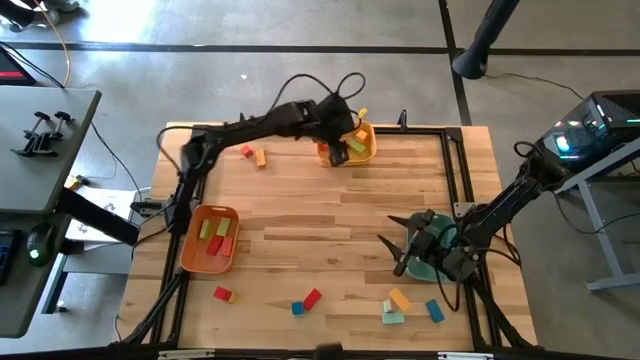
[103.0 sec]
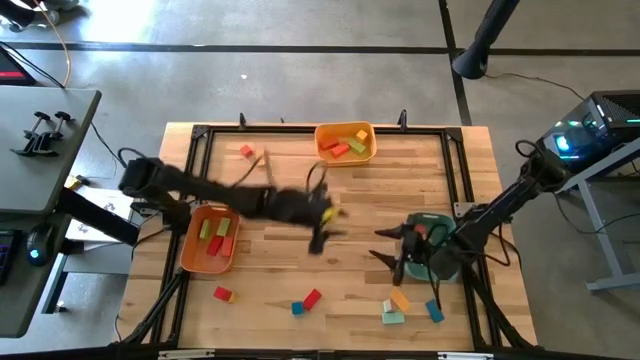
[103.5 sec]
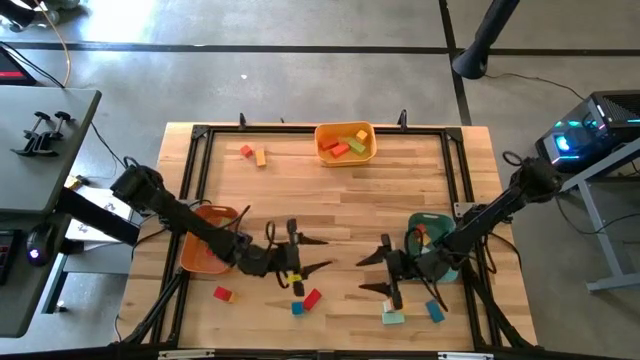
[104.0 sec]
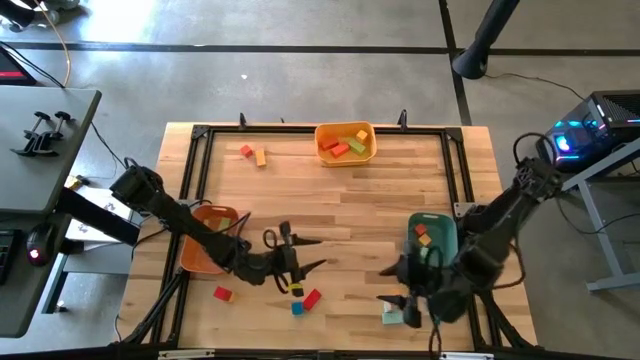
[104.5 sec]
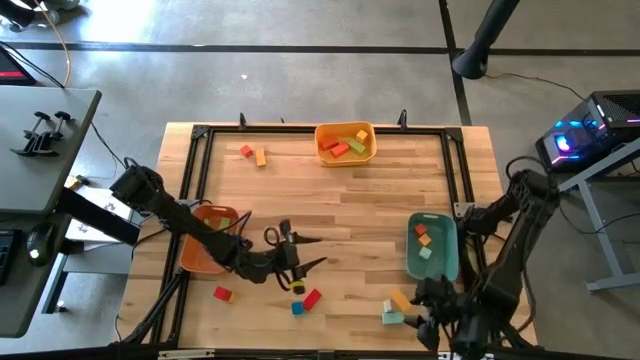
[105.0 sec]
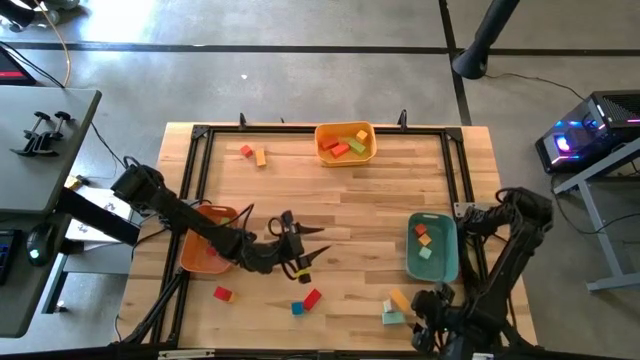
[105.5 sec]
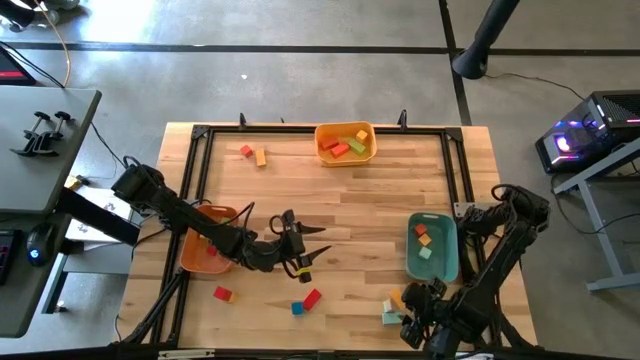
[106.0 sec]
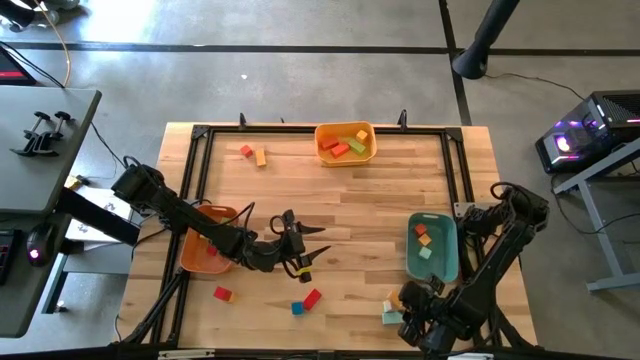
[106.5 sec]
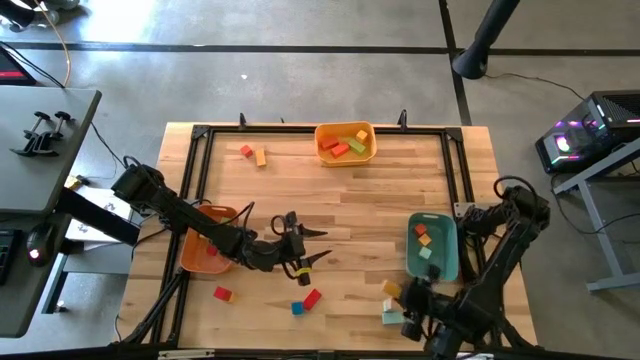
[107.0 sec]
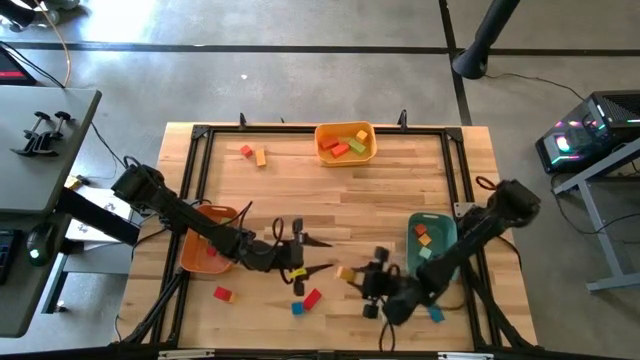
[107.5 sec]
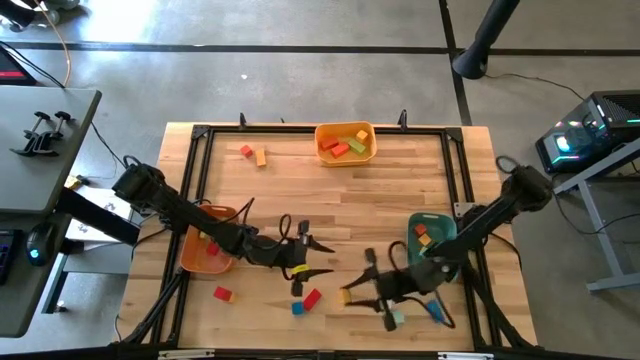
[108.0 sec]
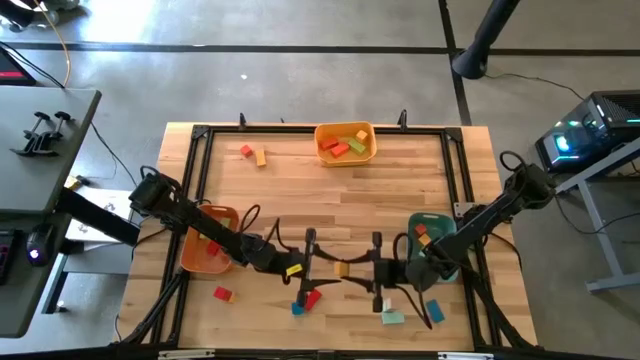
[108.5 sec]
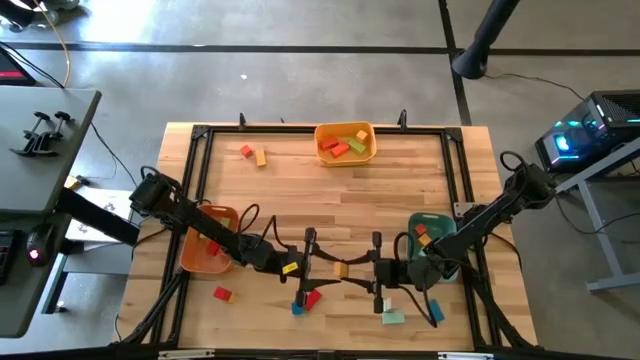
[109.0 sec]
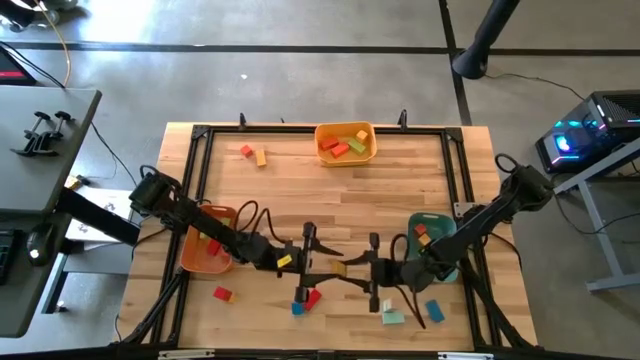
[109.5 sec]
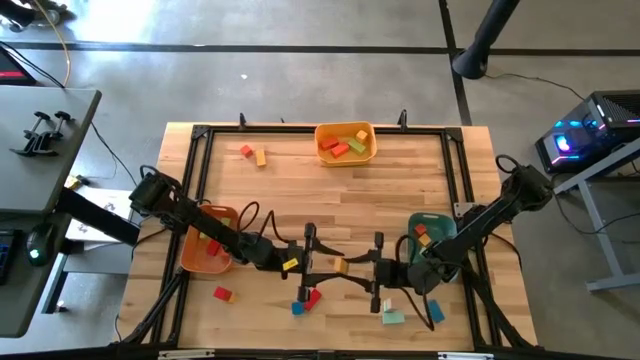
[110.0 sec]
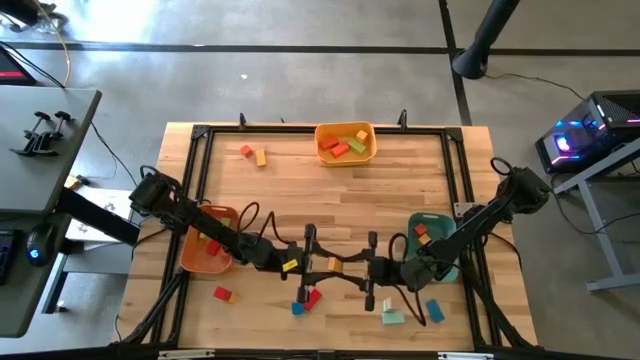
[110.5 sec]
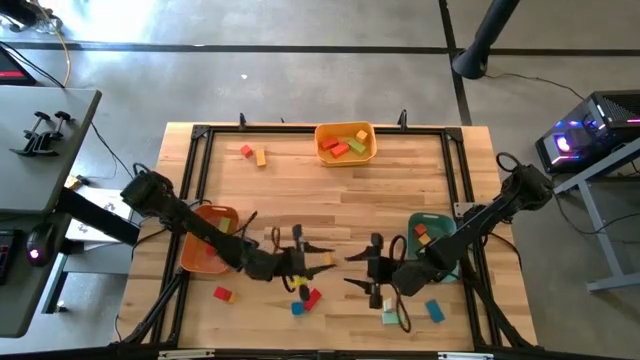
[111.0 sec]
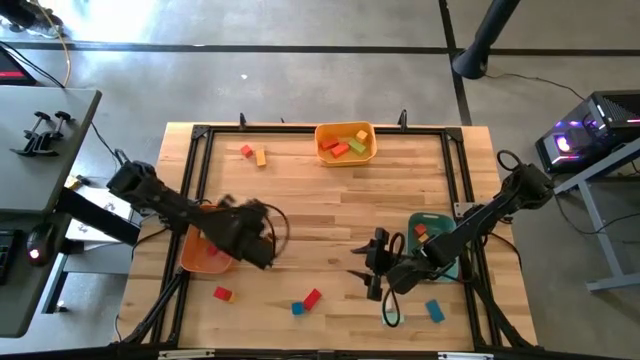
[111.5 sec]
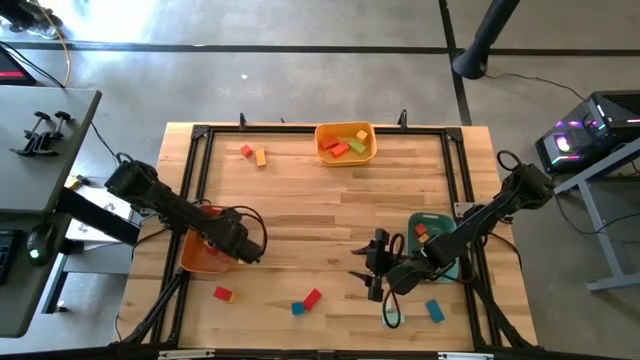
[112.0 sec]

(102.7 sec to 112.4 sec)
Task: Sort blocks by size
Put the yellow medium block into the orange bin

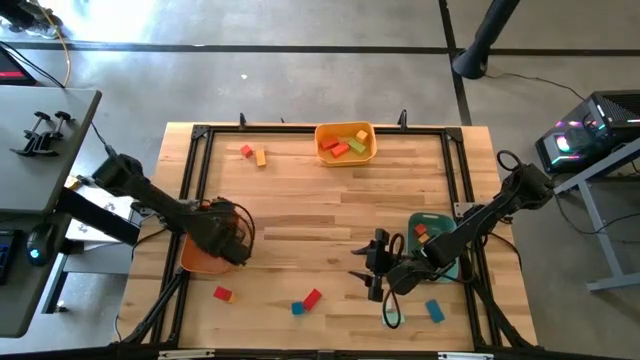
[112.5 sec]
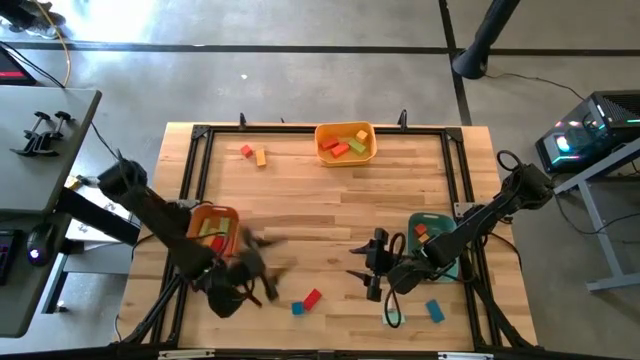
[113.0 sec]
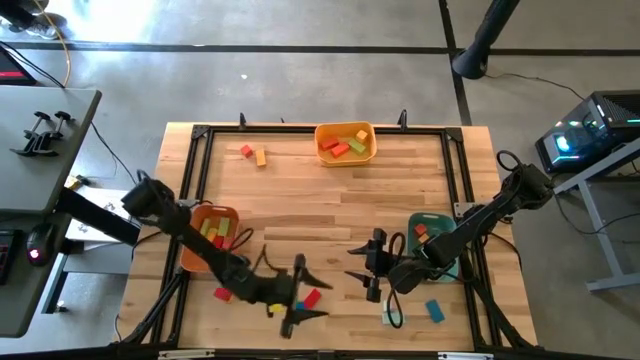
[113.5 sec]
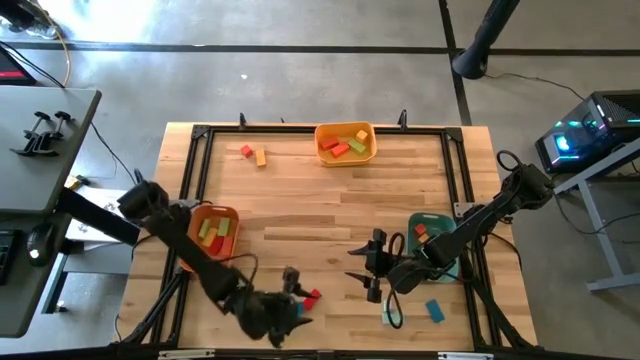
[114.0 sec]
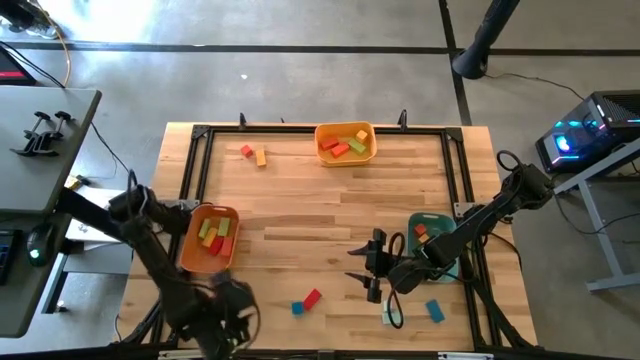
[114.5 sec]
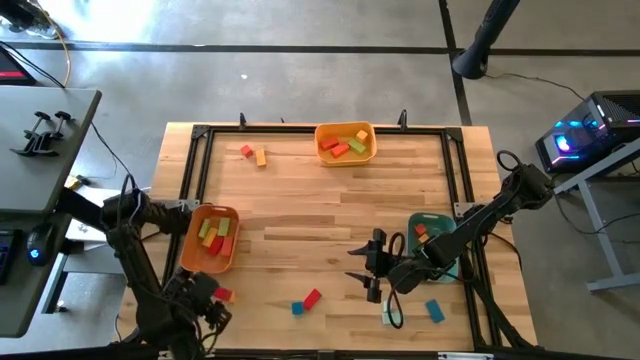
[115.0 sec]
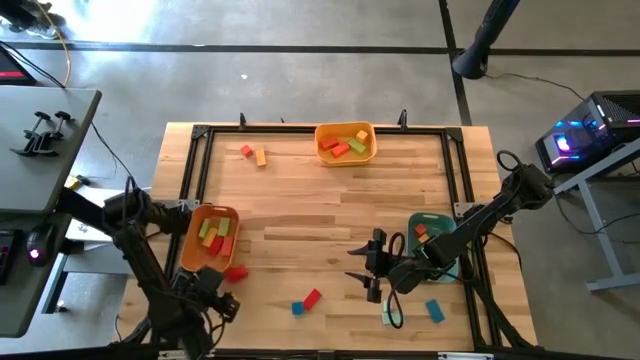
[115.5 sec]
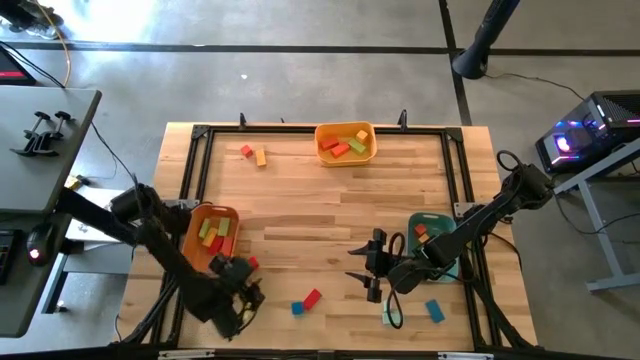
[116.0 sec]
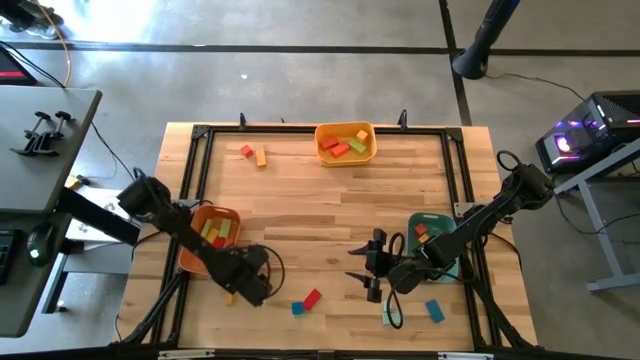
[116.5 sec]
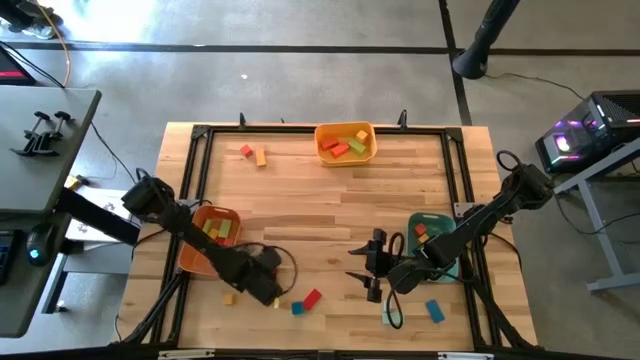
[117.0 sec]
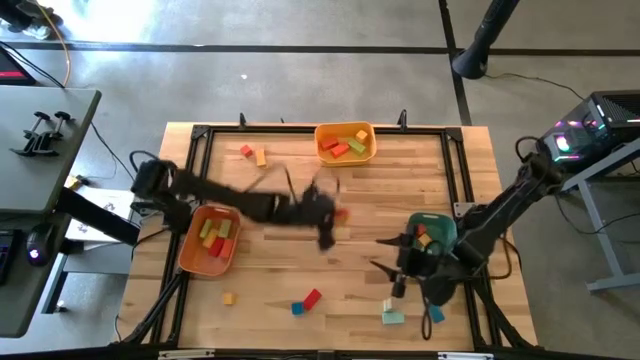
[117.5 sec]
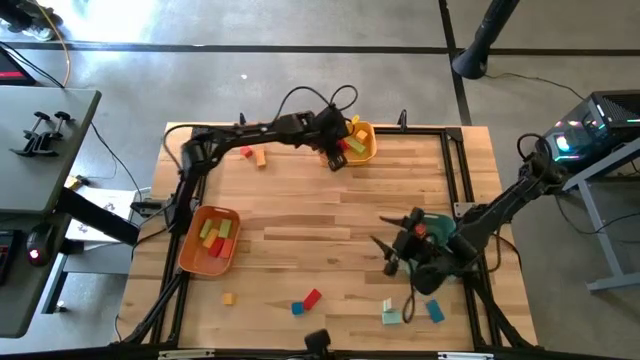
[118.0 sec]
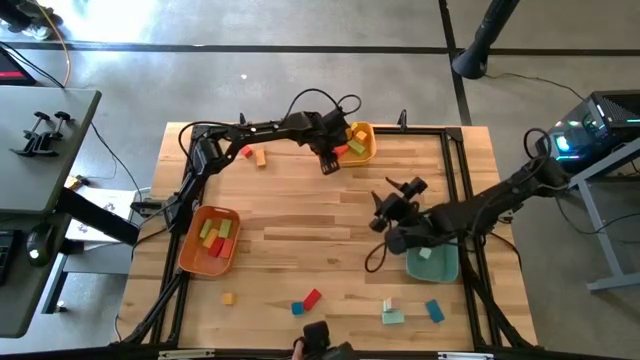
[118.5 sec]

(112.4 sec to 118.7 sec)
Put the red large block into the yellow bin

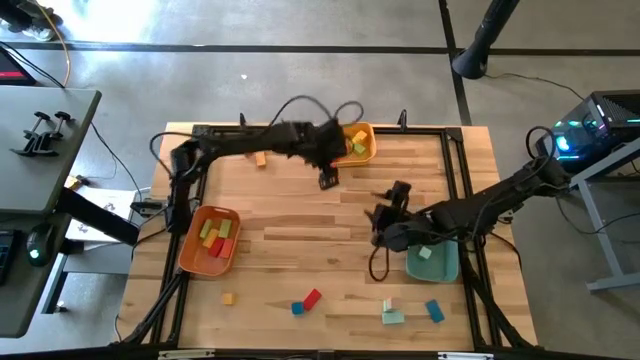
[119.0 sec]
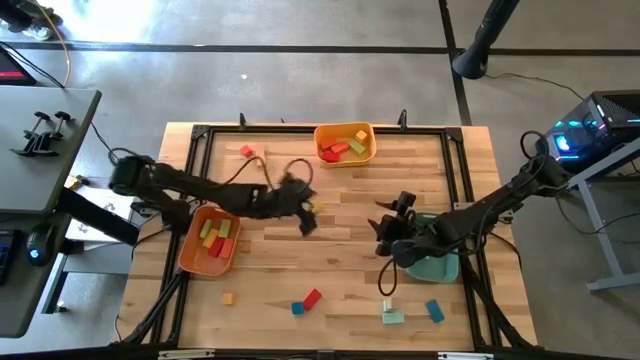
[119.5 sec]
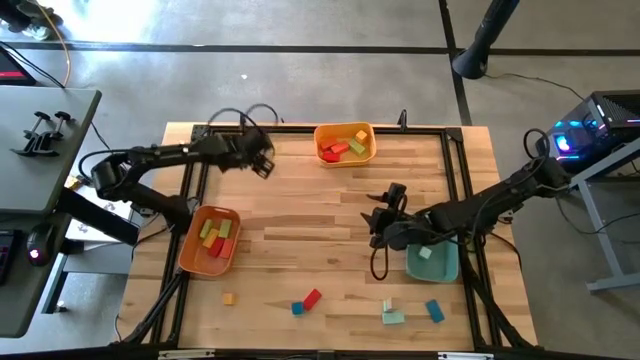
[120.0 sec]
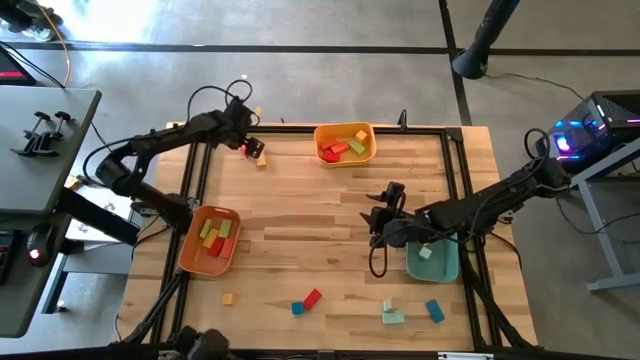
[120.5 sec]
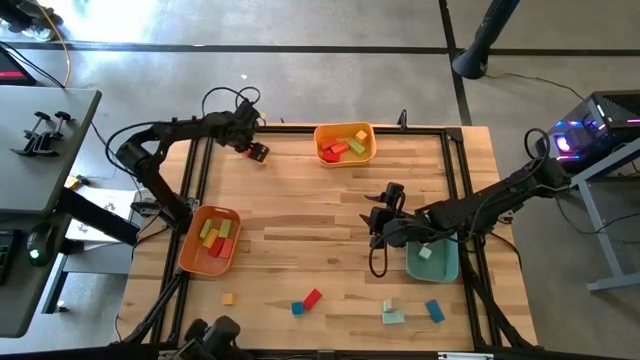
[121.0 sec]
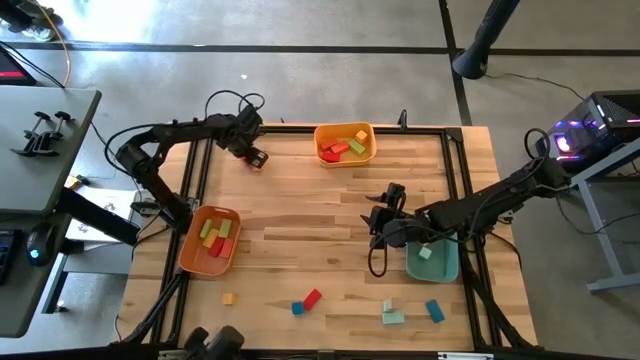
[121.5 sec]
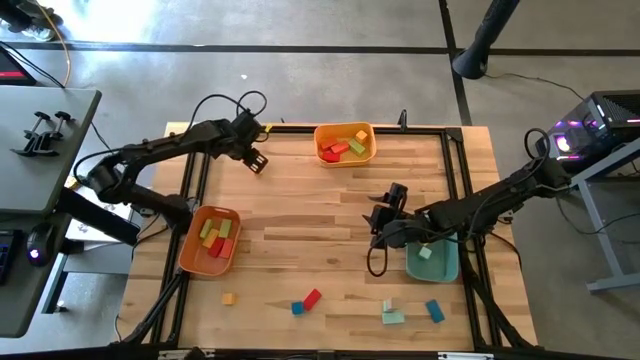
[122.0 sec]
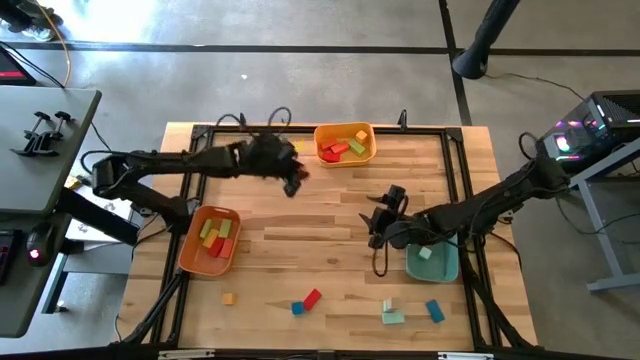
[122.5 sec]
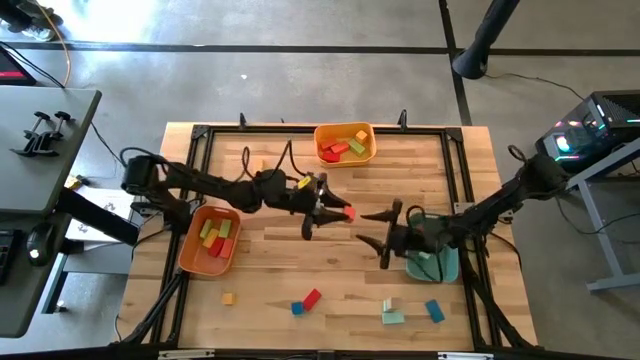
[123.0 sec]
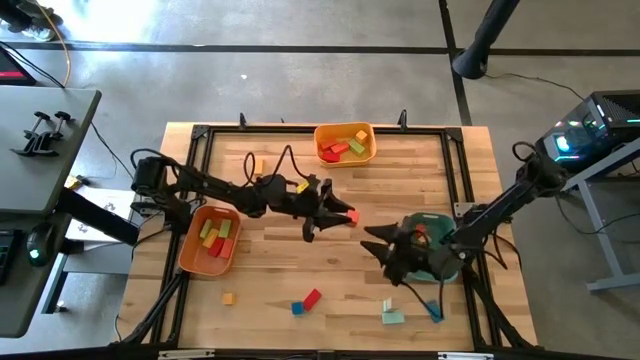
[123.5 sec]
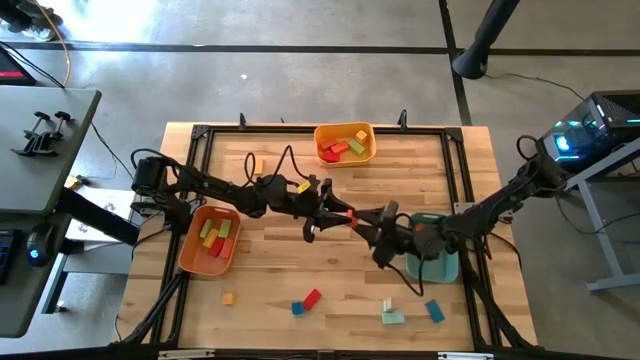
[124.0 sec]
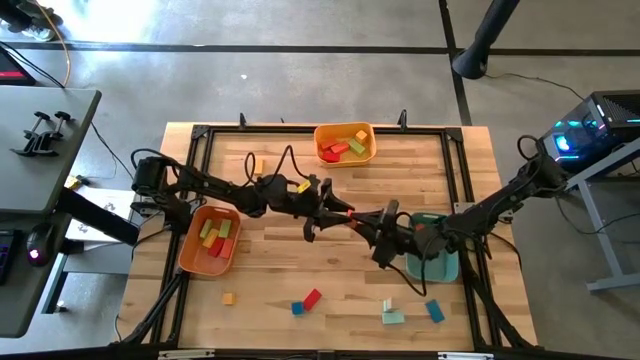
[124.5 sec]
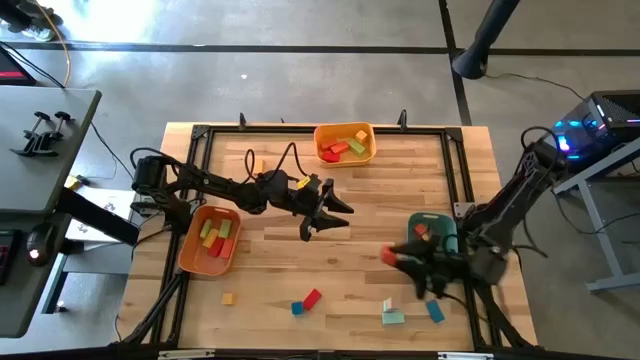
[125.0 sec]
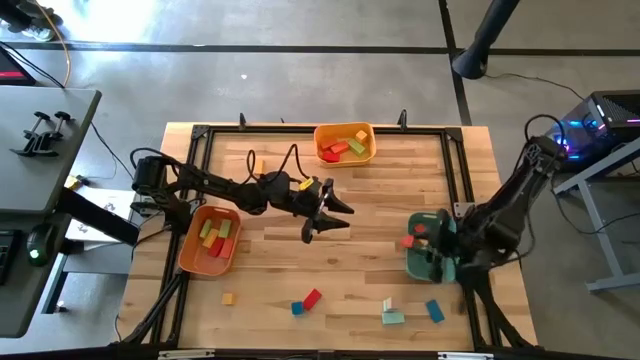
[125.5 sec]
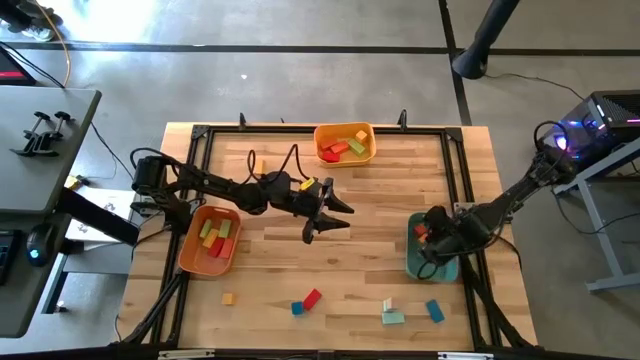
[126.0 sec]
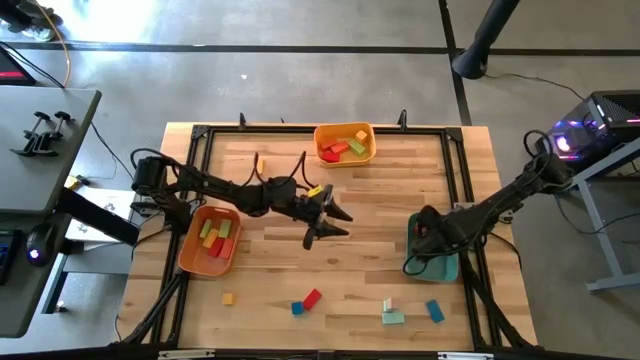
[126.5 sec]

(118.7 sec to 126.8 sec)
Put the orange small block into the green bin
